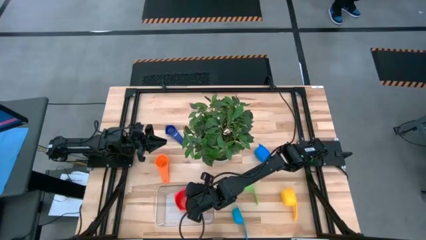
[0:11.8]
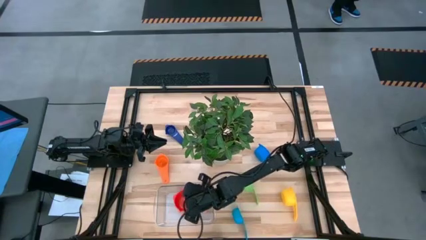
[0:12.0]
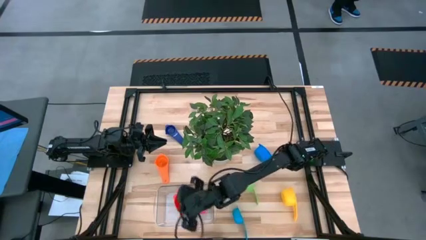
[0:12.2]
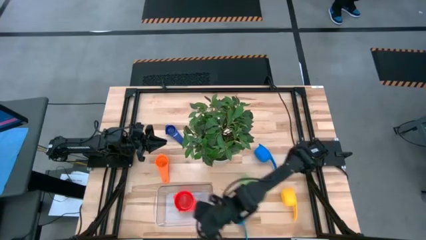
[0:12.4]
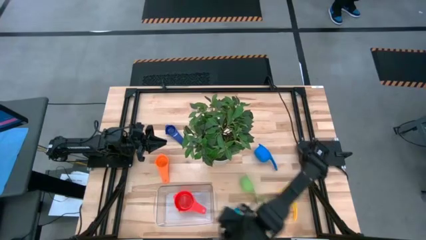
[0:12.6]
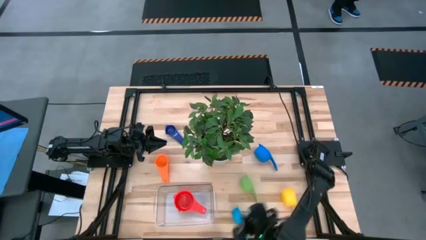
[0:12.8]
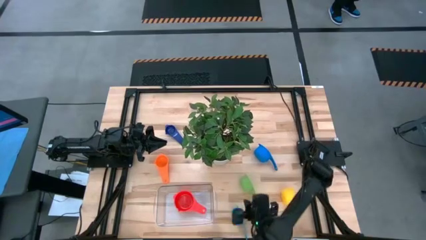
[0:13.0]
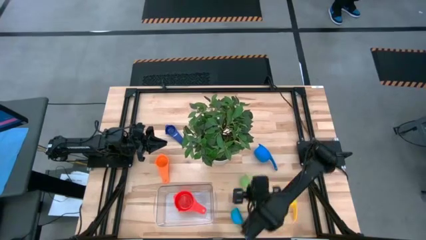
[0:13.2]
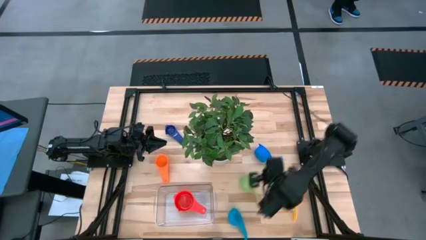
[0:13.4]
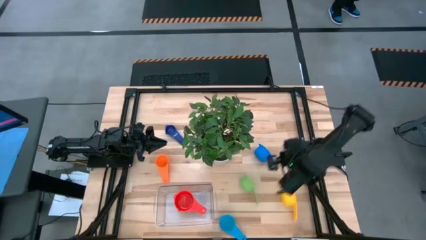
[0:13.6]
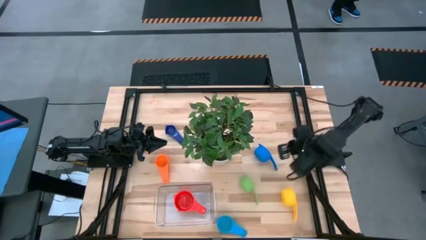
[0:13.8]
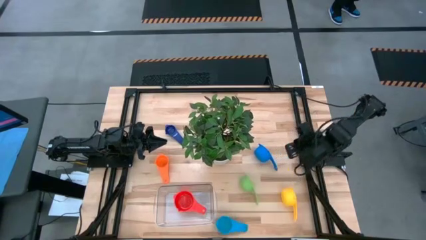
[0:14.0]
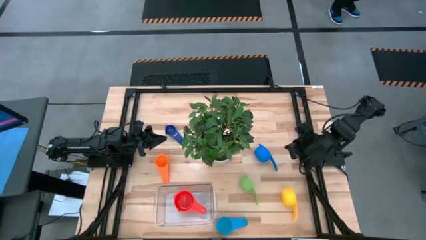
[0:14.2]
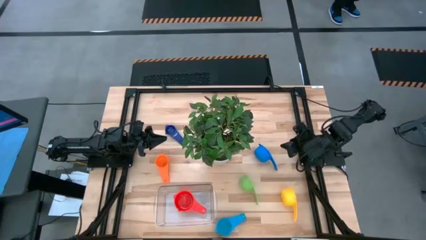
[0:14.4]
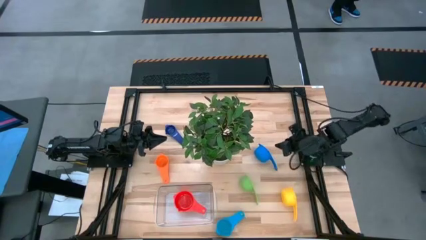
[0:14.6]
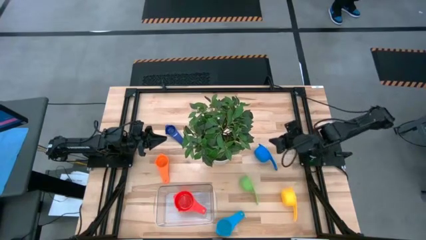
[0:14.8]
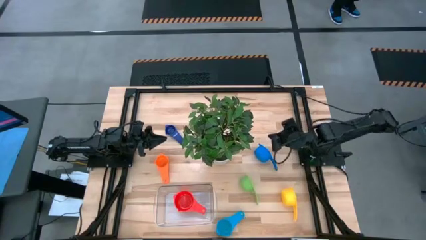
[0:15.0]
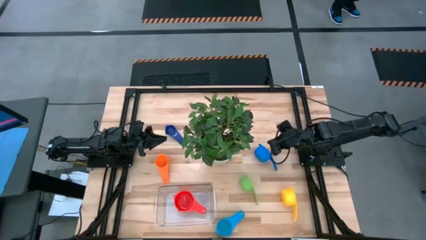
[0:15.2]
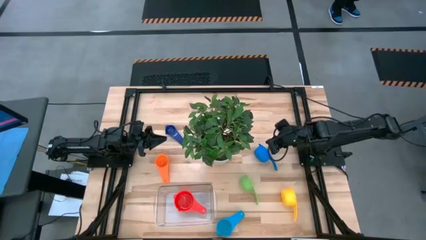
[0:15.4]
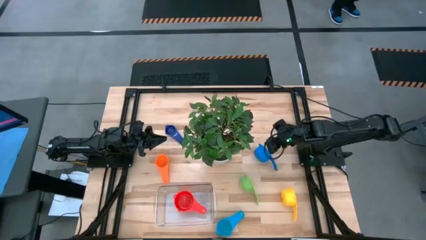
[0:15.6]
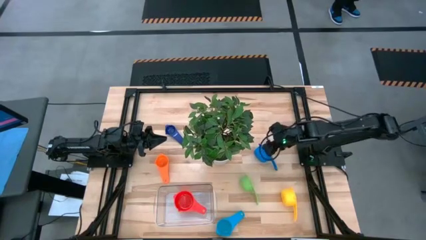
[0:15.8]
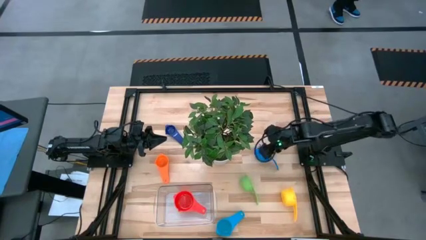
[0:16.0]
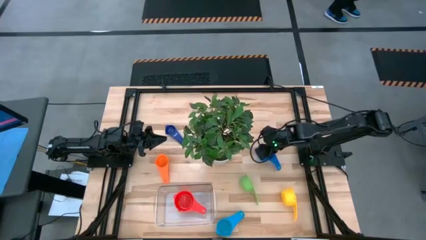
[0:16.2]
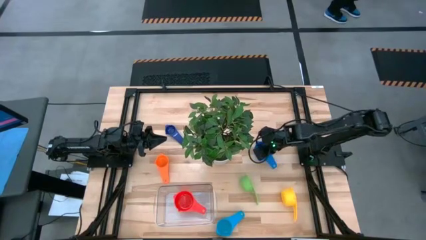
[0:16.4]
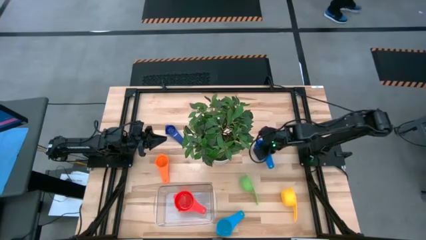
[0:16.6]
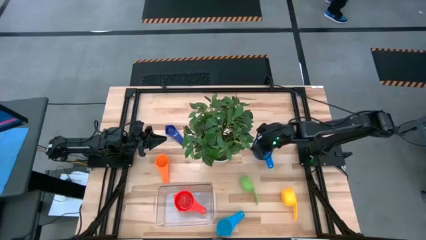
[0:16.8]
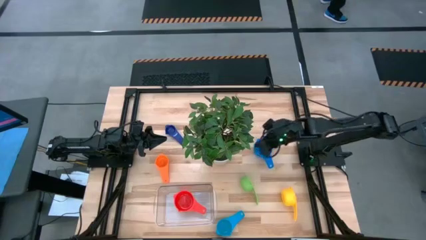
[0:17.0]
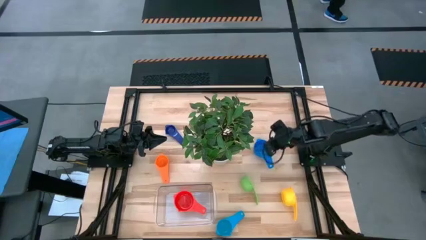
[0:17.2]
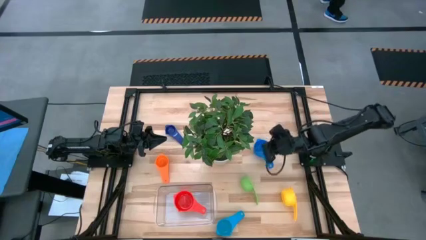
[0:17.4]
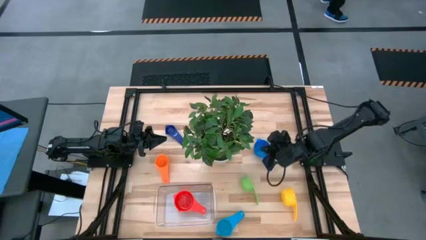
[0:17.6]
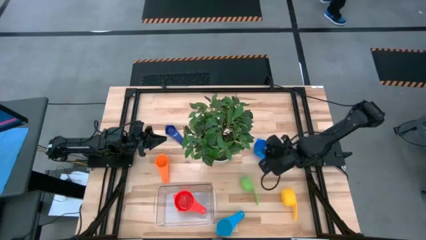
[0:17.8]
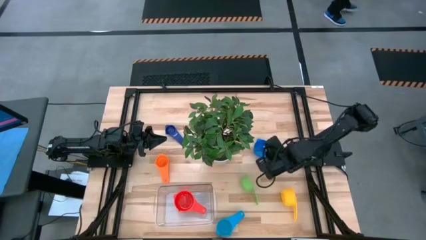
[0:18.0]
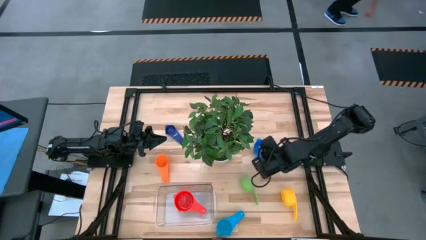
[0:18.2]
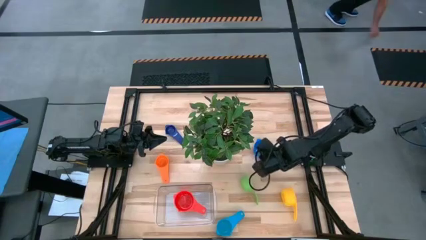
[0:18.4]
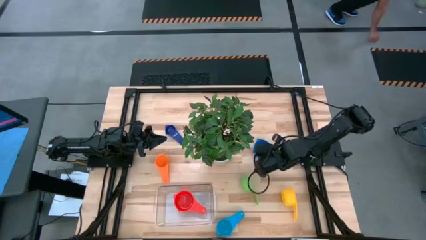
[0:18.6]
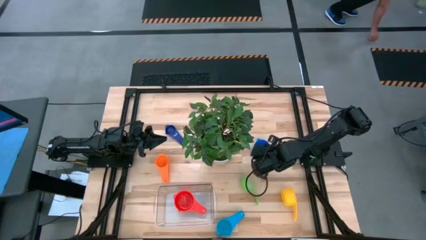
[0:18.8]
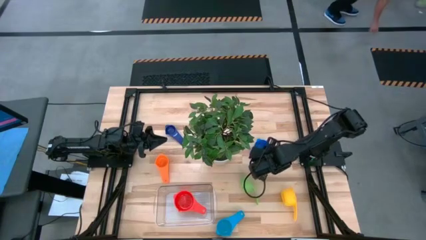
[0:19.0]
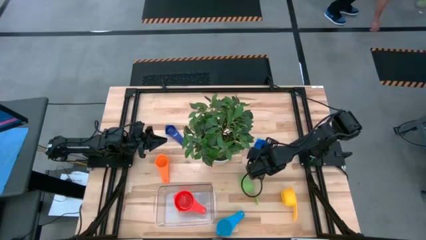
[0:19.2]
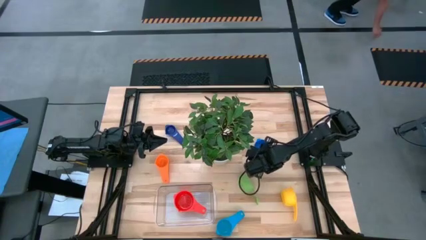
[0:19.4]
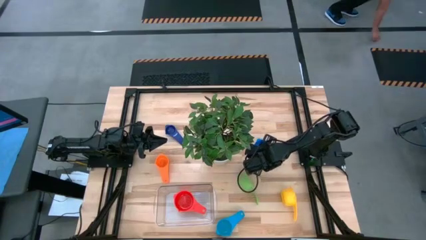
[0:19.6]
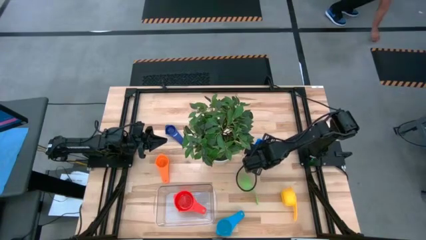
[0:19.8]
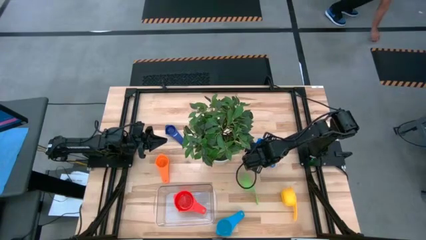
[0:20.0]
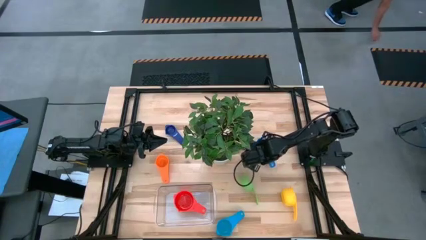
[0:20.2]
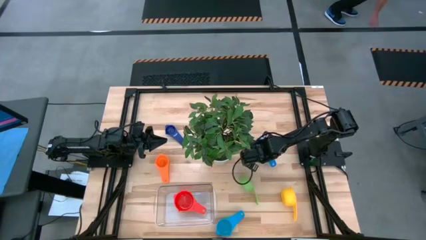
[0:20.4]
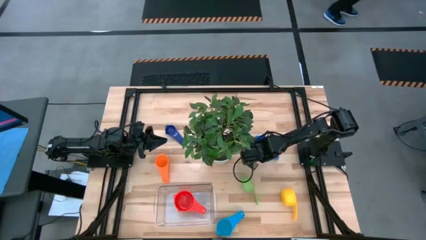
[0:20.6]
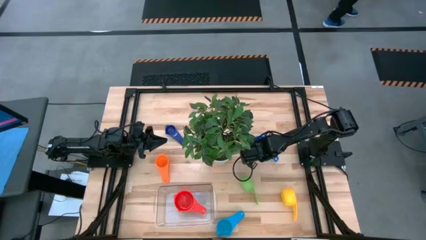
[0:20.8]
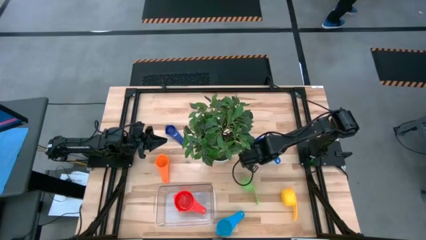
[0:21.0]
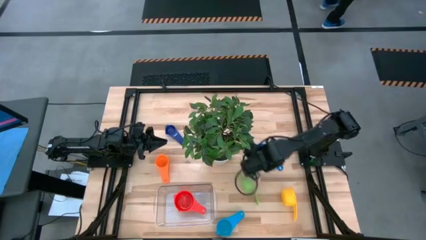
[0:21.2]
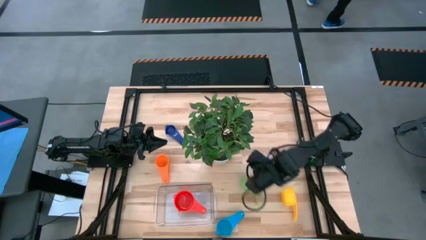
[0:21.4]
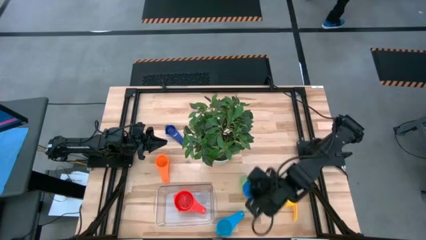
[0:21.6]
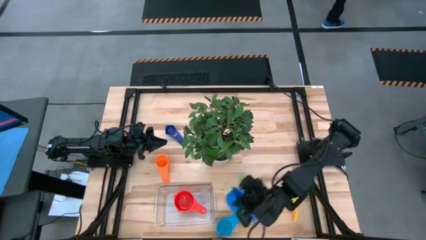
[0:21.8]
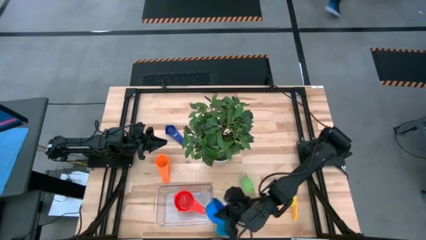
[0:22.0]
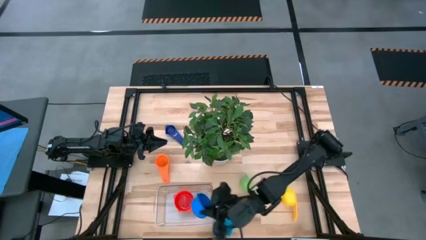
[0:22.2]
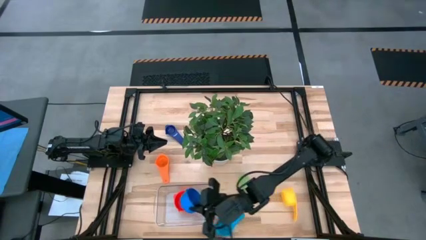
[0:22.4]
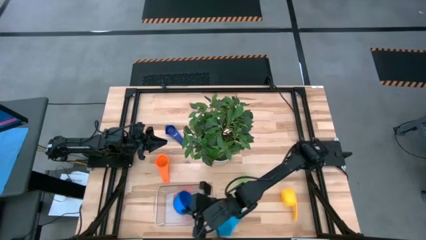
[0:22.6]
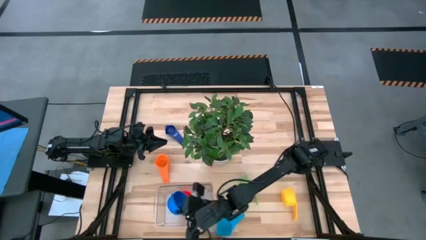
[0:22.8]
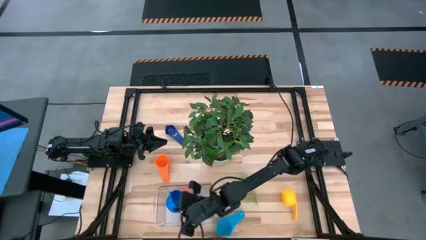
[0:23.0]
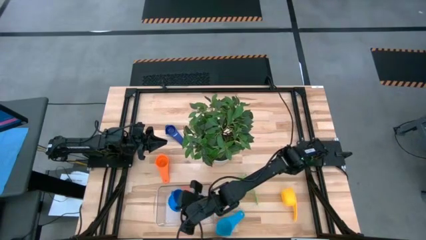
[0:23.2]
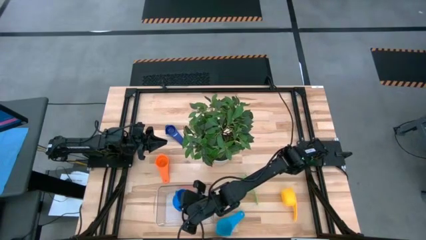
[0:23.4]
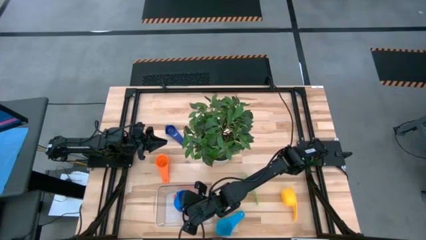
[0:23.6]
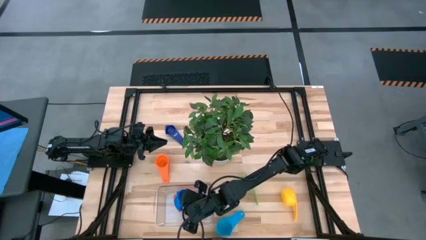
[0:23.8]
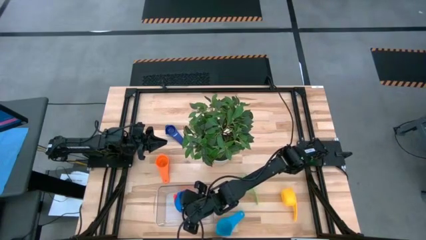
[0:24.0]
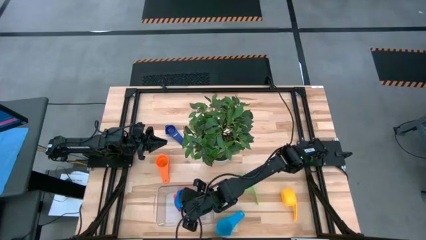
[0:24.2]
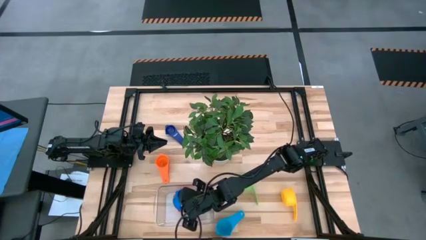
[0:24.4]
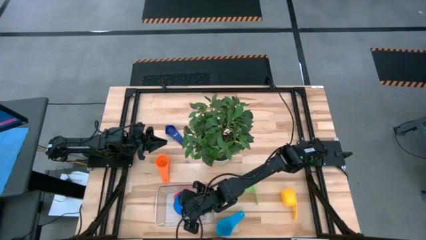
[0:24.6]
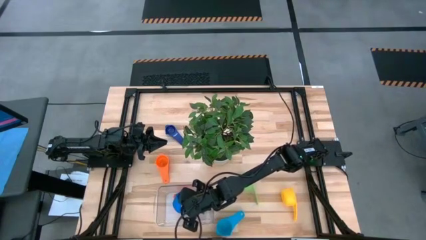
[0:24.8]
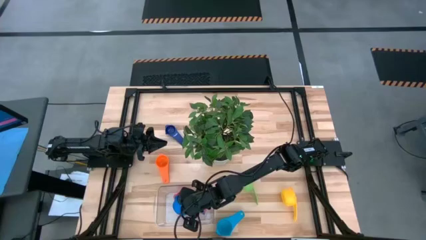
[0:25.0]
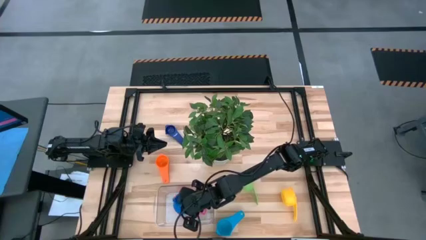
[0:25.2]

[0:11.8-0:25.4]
Task: Nest measuring cups in basket
Stack the blue measuring cup on the red measuring cup
